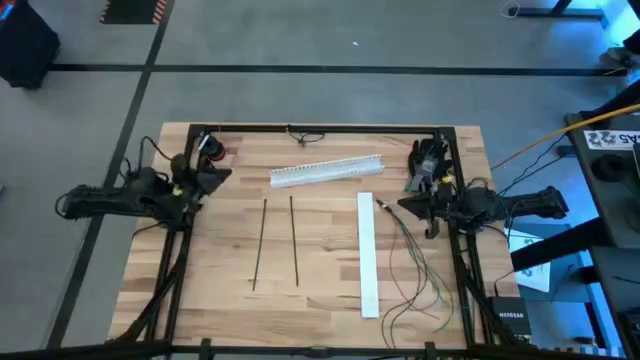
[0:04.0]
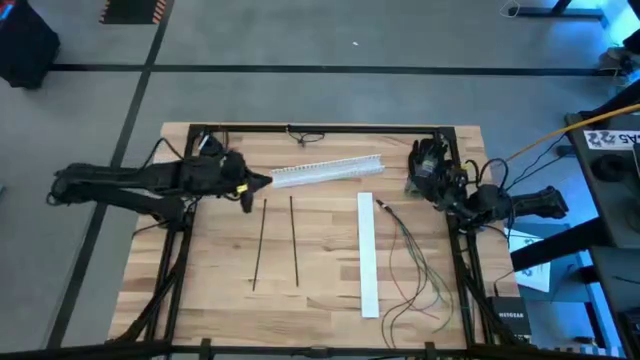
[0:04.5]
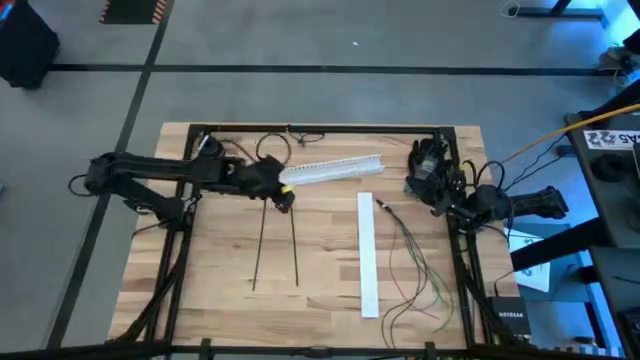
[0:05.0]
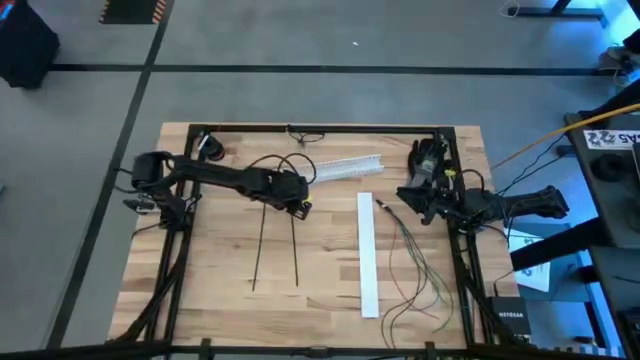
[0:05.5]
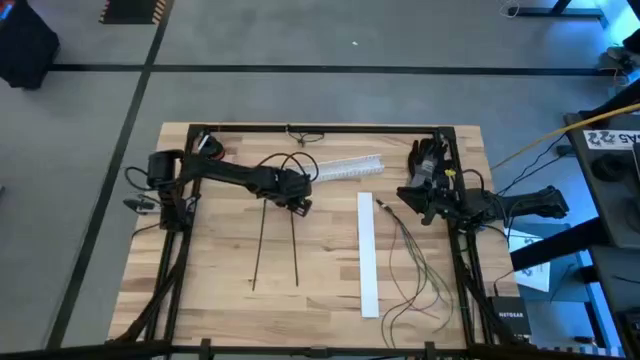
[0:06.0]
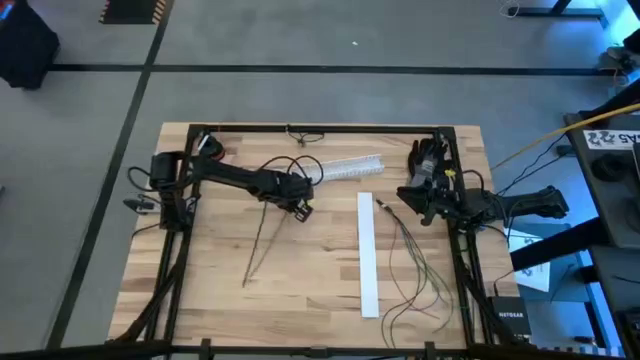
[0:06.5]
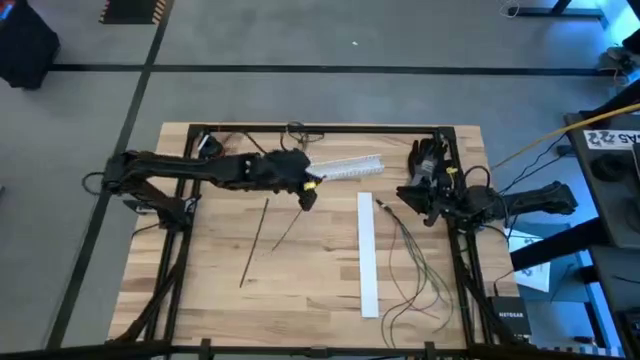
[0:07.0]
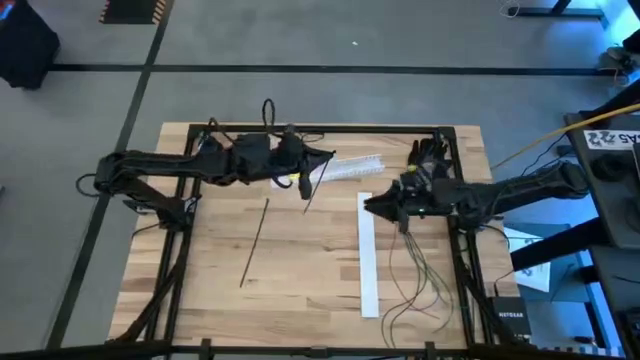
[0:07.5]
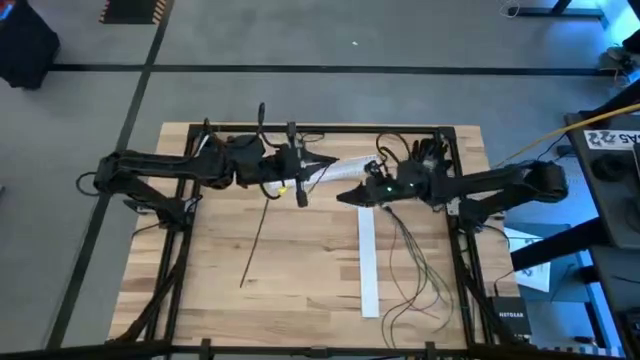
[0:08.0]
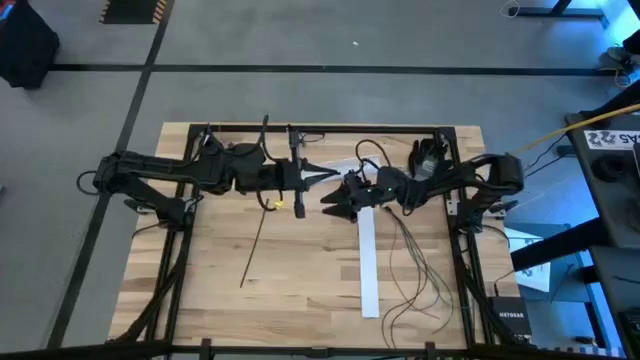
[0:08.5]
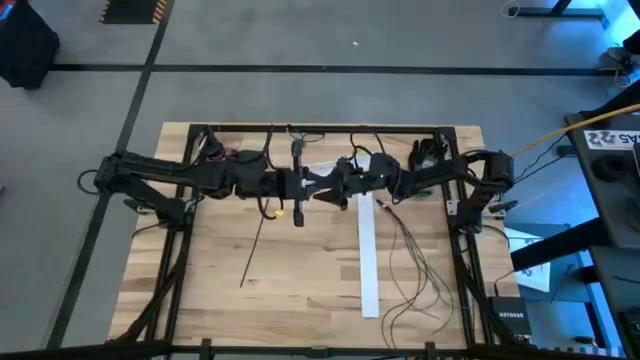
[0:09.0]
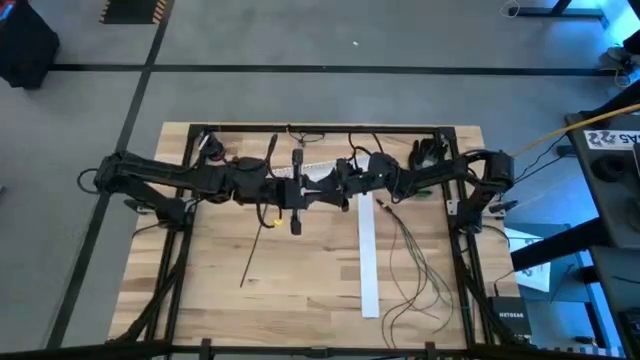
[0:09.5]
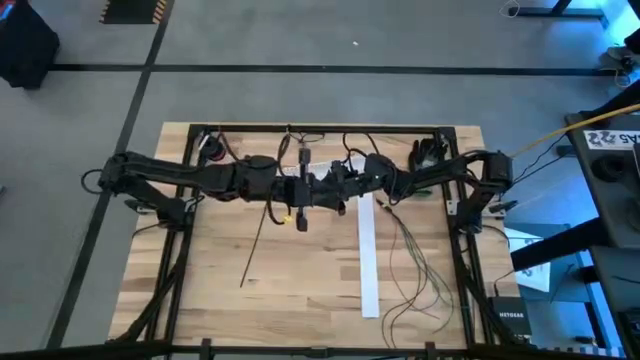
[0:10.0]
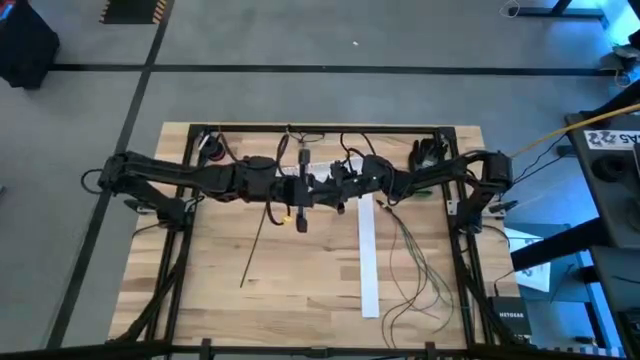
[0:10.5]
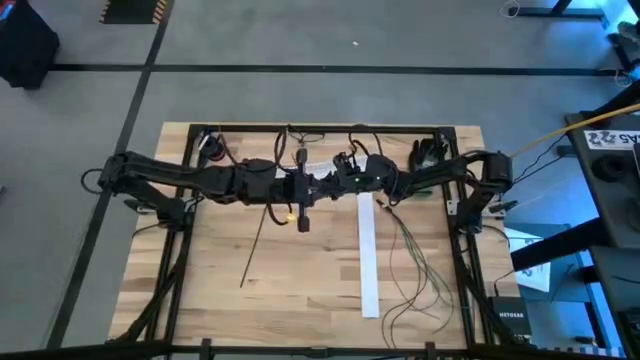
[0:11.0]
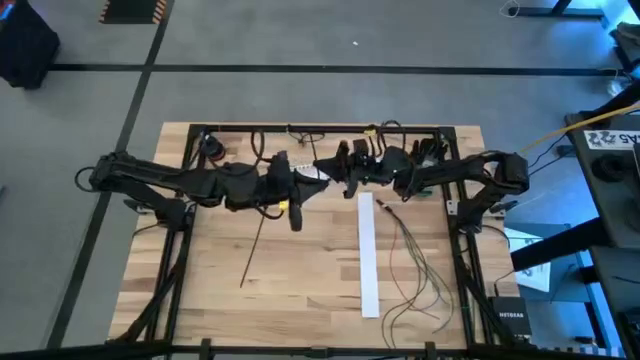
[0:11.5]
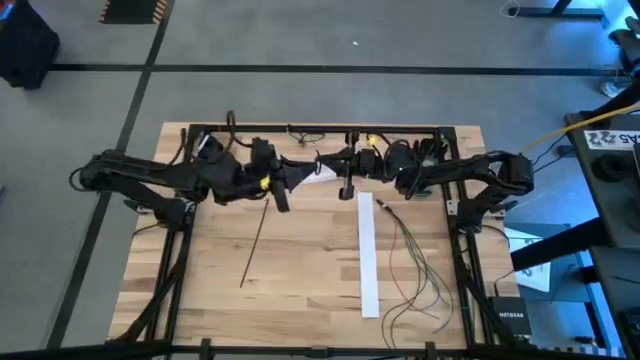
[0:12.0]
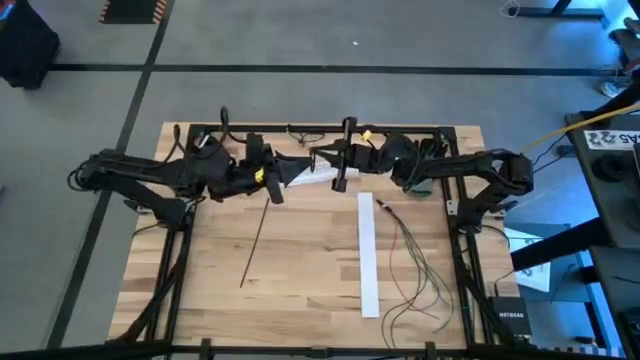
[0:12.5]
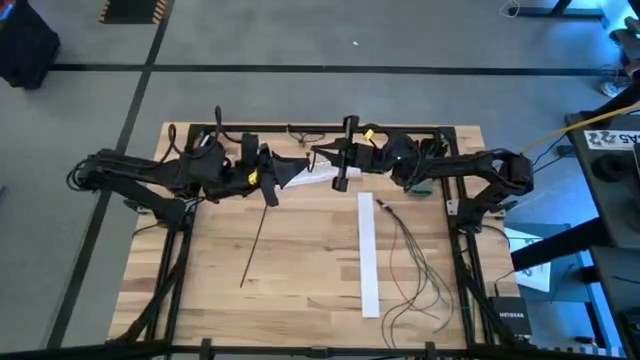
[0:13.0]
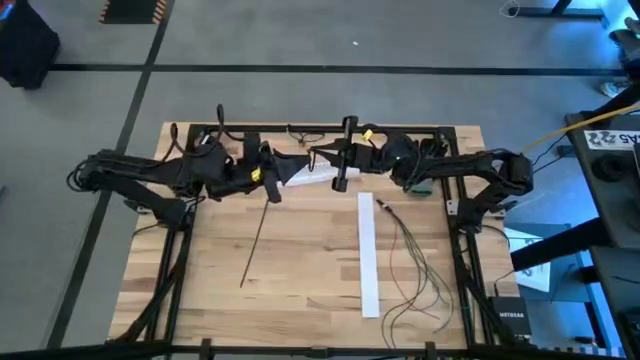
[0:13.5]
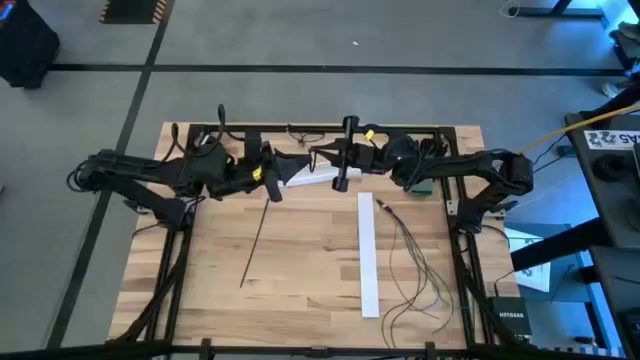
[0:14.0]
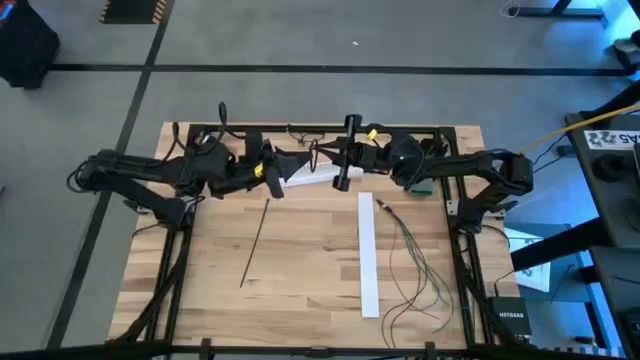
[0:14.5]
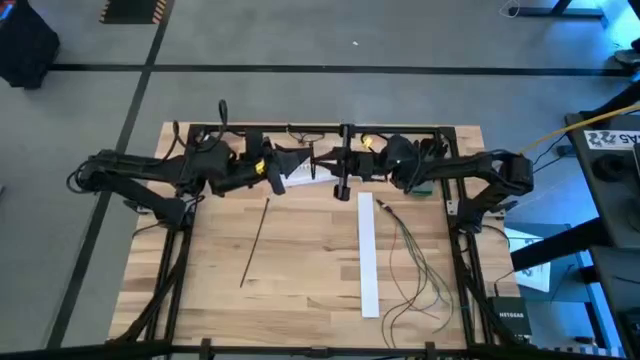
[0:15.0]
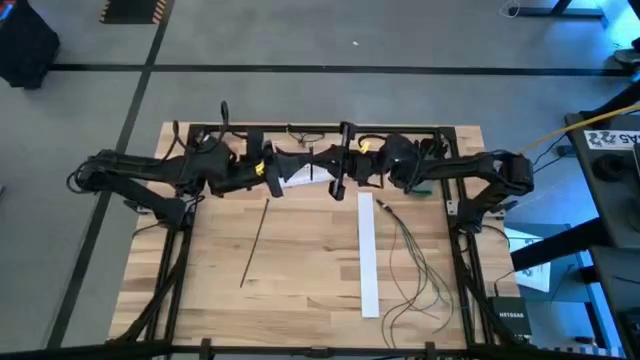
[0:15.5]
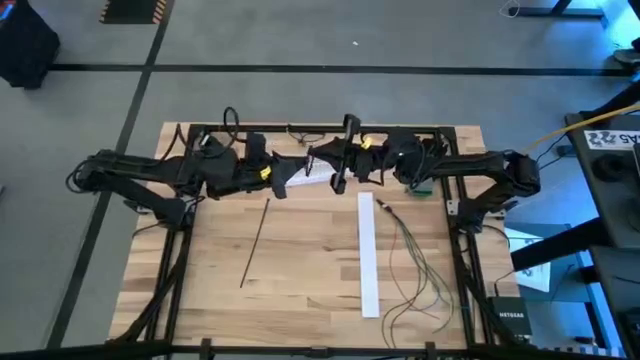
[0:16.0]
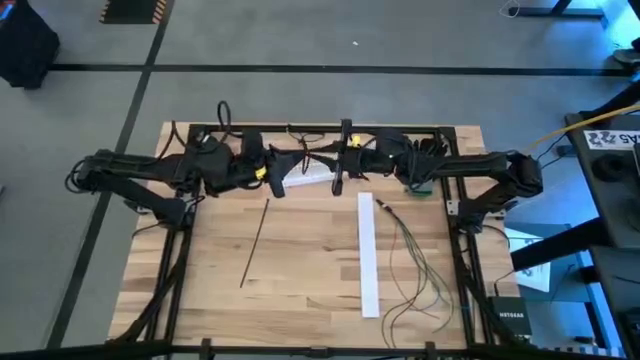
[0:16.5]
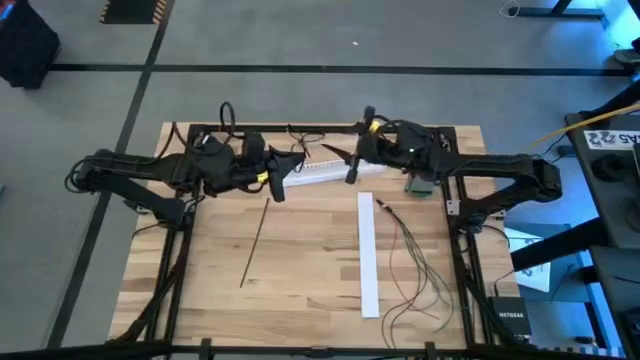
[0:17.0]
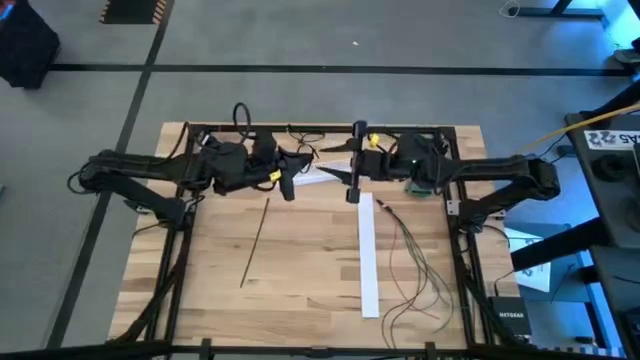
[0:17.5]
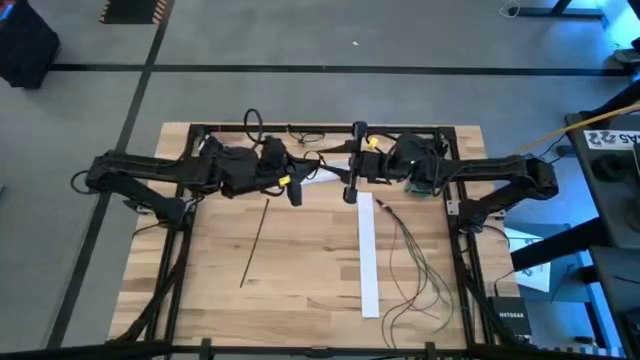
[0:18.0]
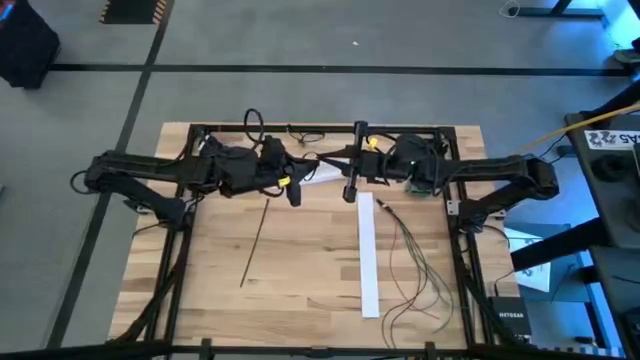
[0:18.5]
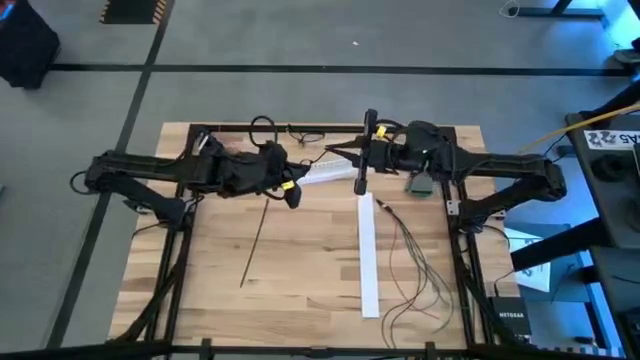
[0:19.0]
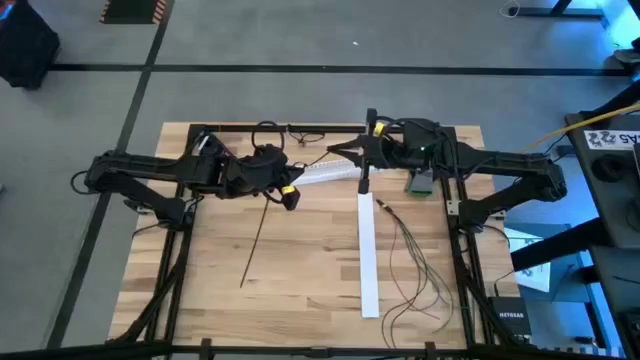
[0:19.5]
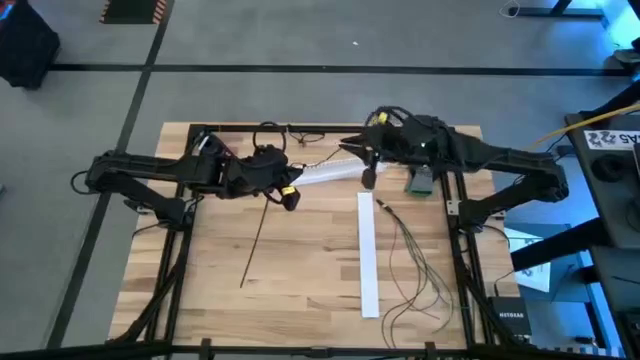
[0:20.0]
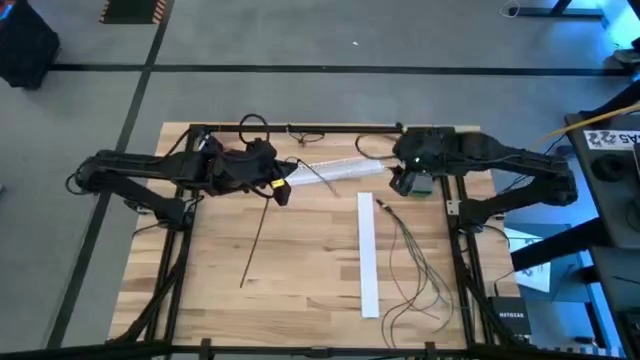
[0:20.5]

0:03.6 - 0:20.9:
Task: Ziptie cables
Wrap the right black zip-tie around the cable wires
